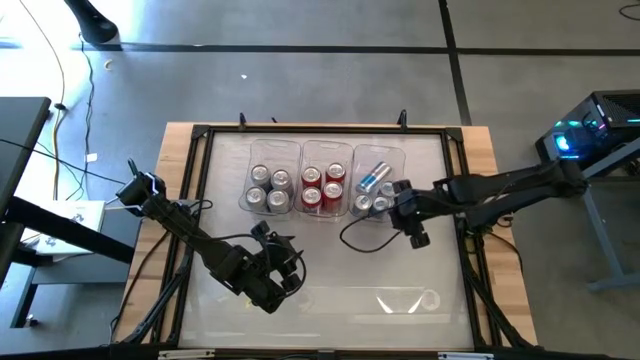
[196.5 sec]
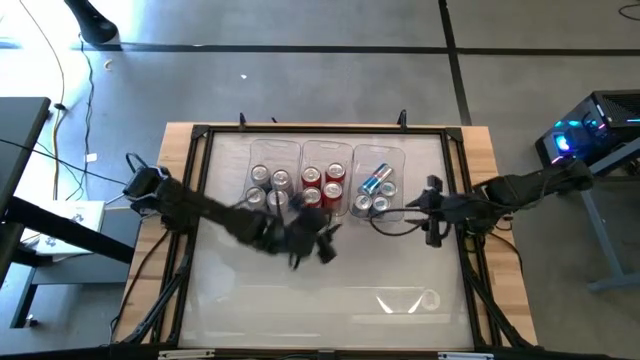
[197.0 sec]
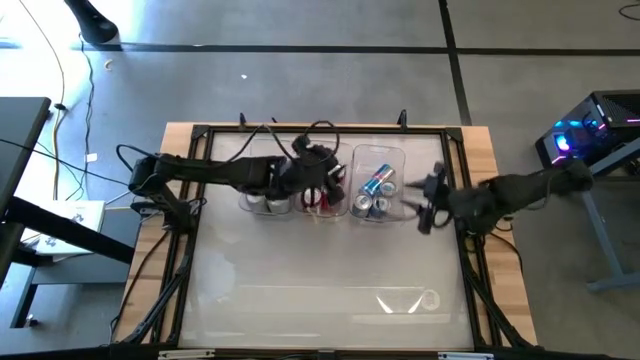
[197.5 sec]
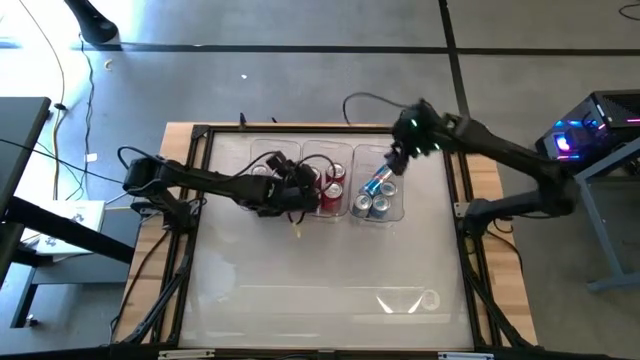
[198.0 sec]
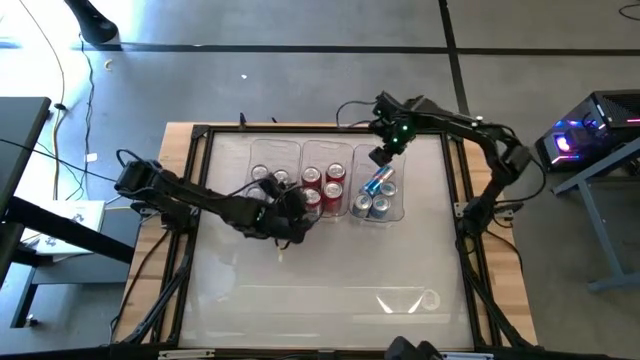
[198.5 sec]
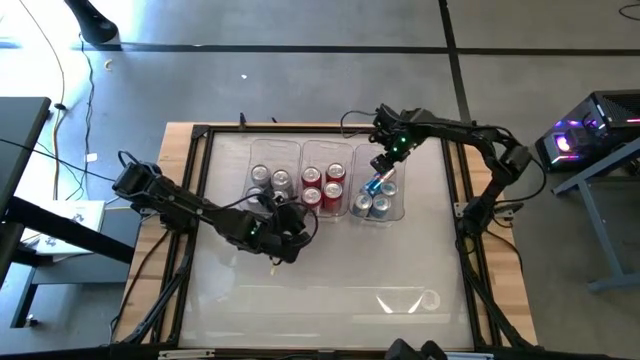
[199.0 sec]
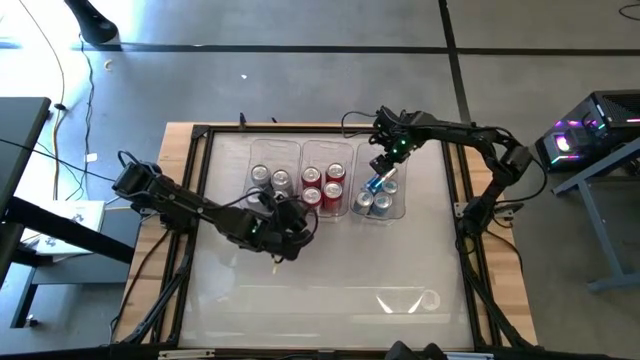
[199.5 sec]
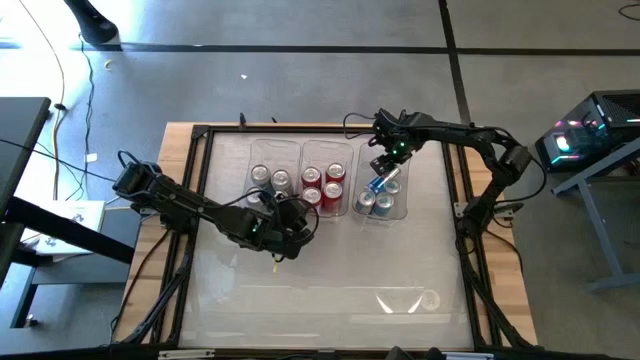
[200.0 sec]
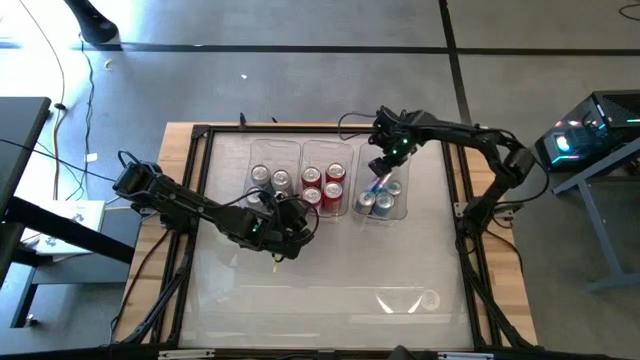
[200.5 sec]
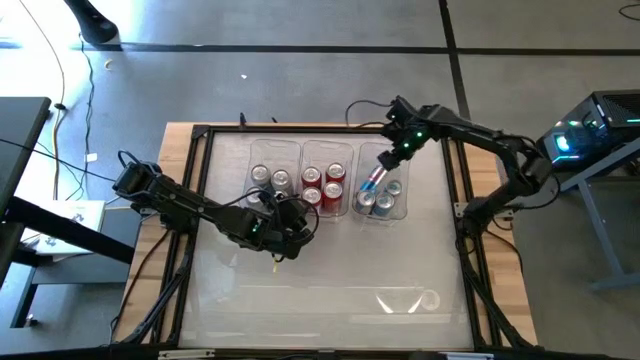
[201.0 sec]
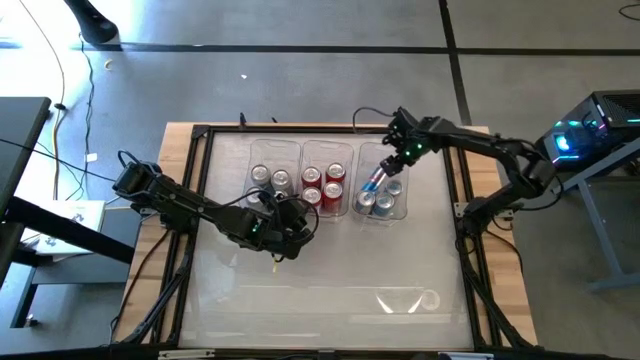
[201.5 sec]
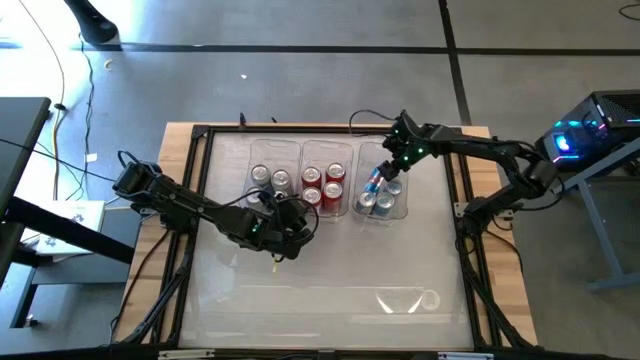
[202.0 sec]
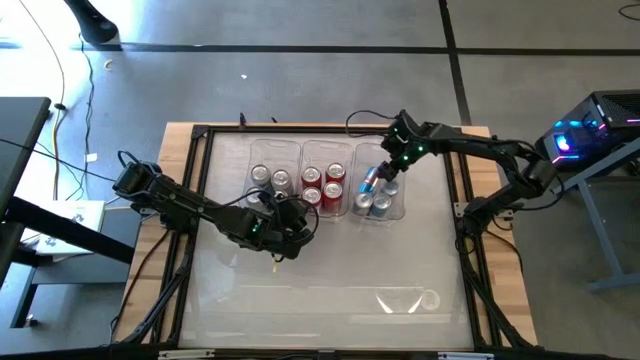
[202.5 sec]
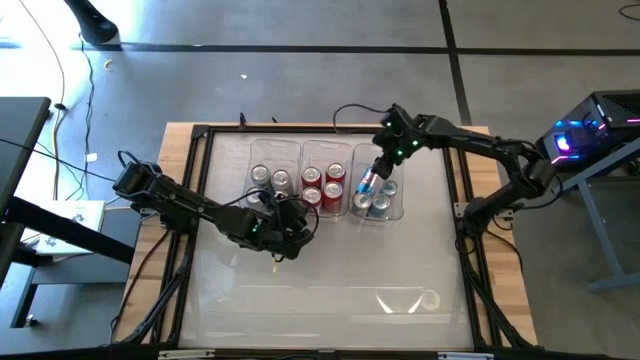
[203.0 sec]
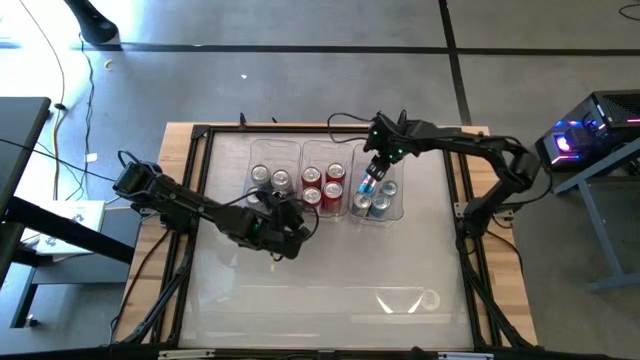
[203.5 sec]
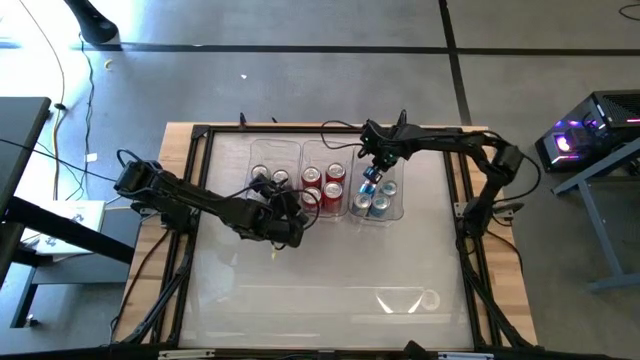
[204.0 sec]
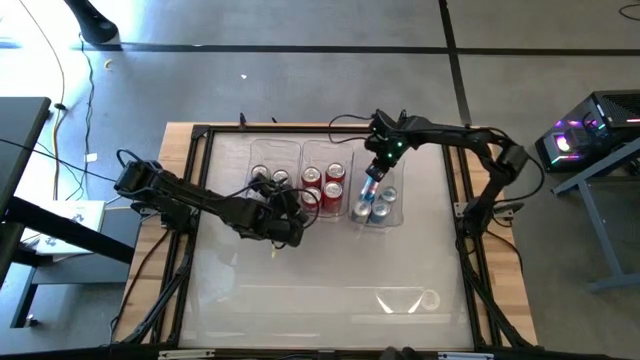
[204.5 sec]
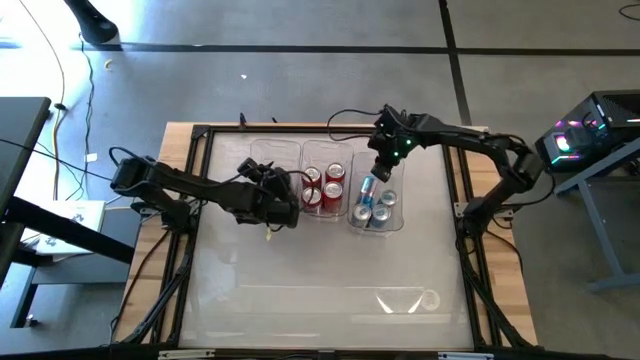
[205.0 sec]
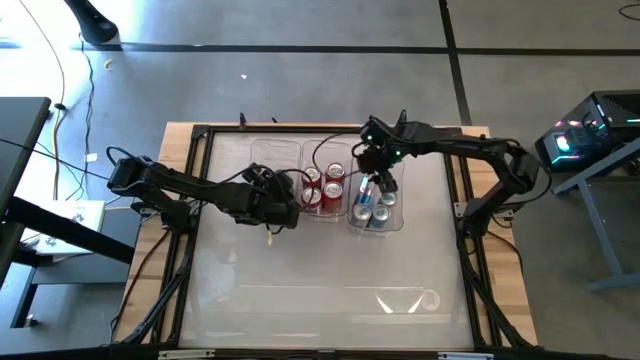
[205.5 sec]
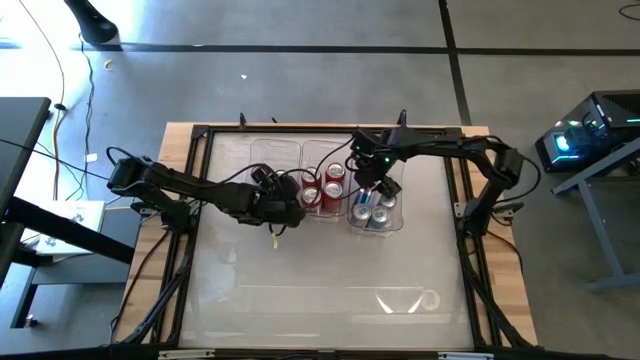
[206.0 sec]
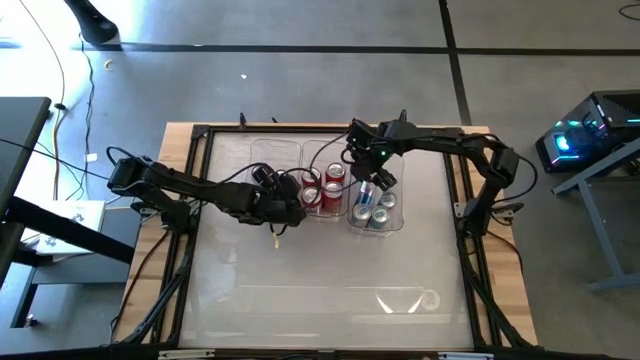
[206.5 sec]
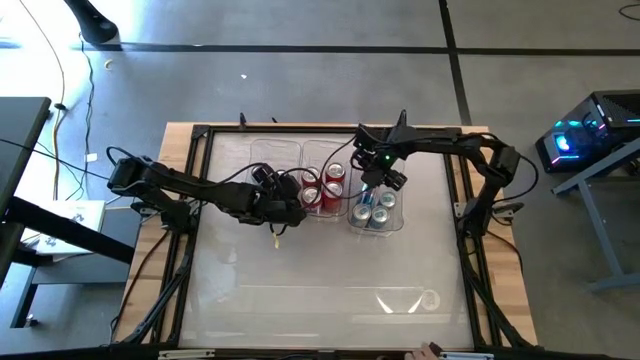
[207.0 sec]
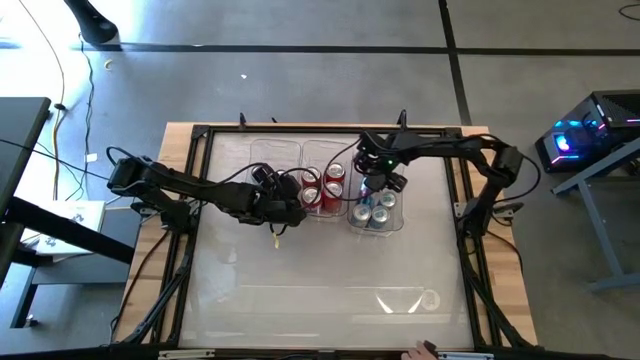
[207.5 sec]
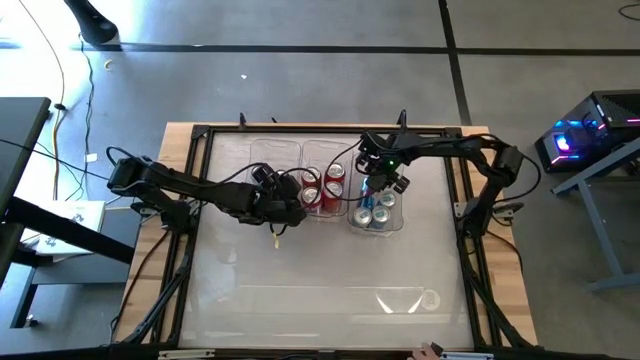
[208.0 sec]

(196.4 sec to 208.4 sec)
Task: Sort soda cans
Put the top left blue soda can inside the right transparent bin upright

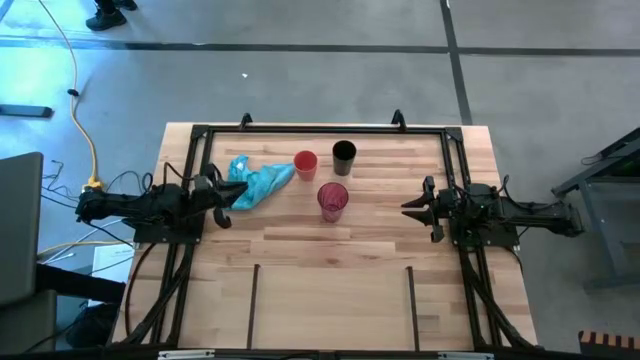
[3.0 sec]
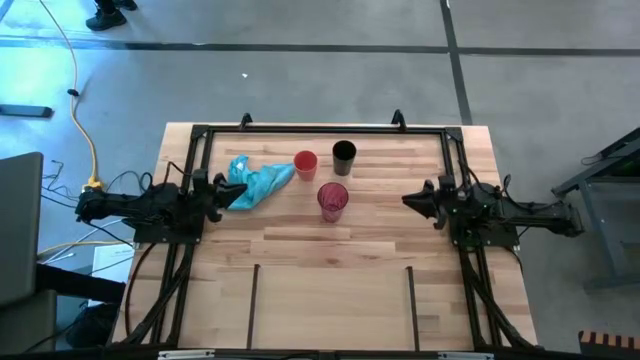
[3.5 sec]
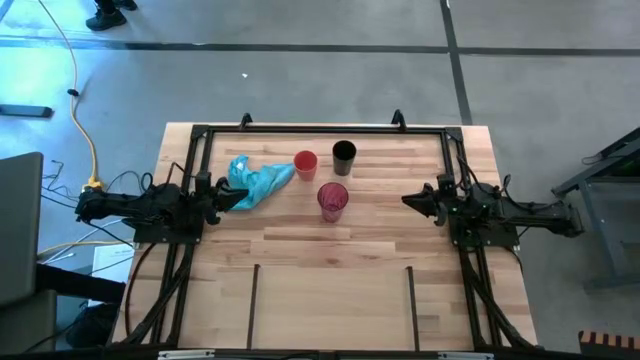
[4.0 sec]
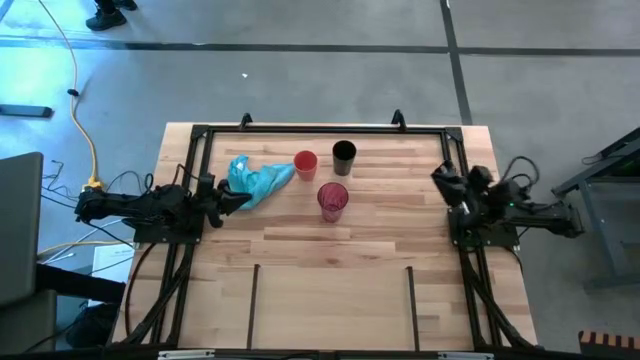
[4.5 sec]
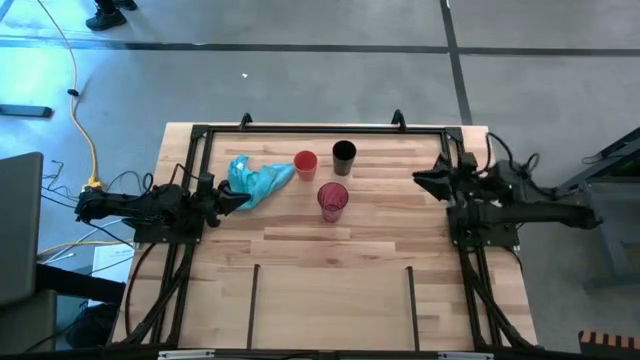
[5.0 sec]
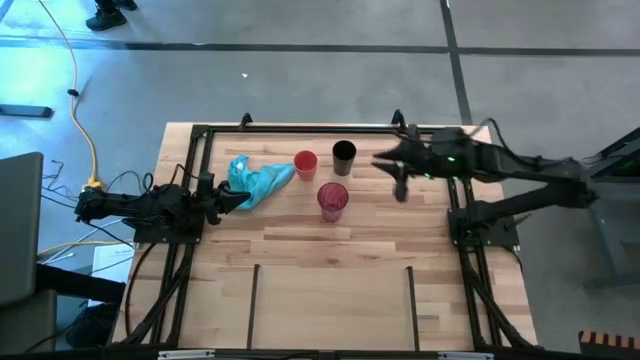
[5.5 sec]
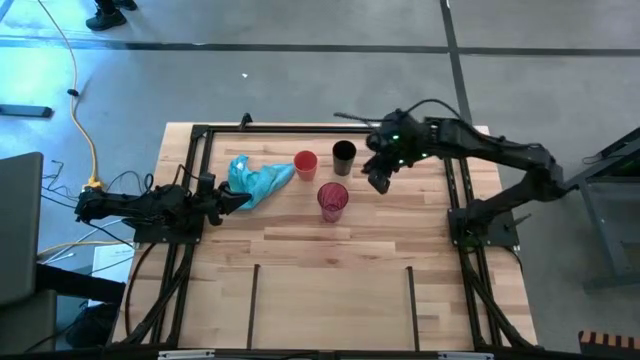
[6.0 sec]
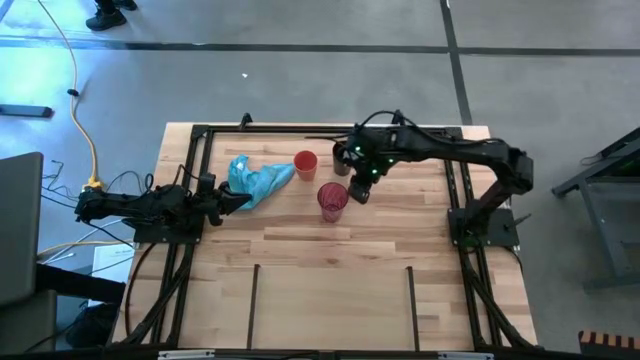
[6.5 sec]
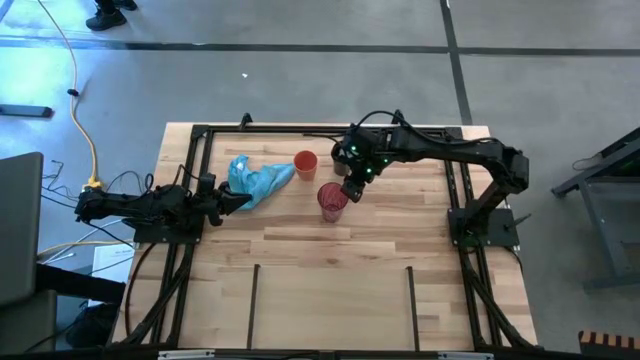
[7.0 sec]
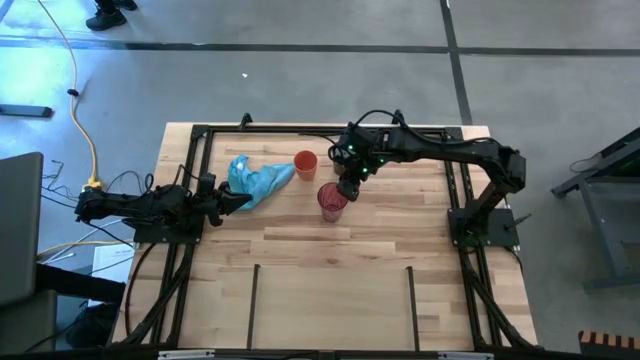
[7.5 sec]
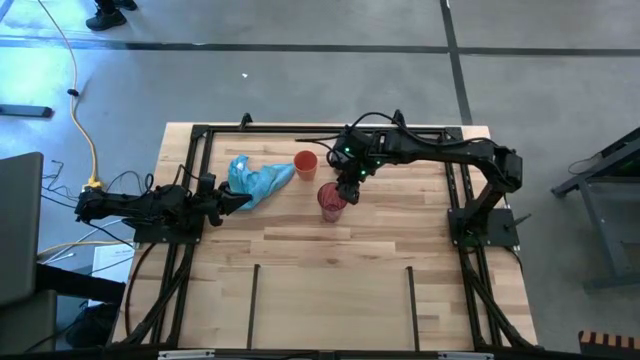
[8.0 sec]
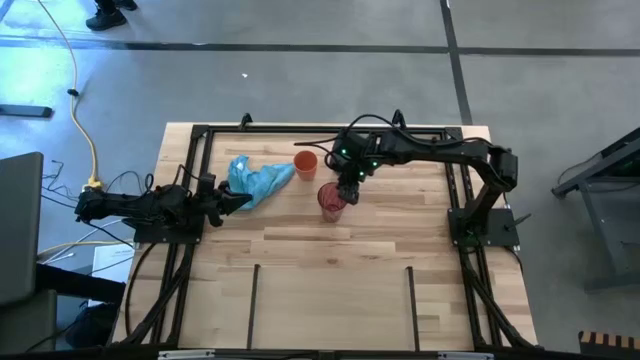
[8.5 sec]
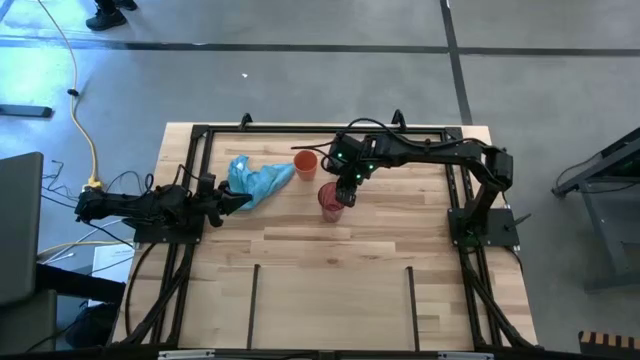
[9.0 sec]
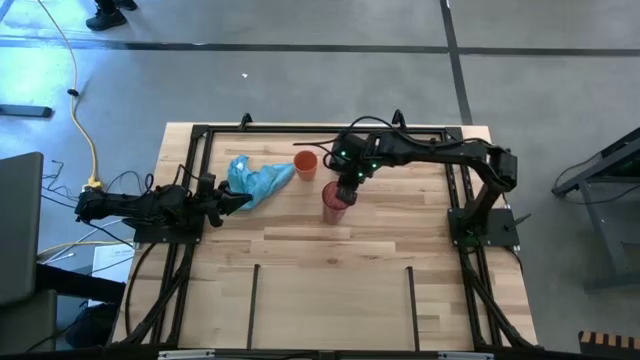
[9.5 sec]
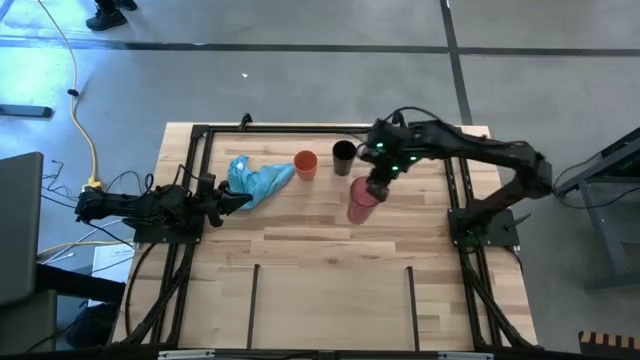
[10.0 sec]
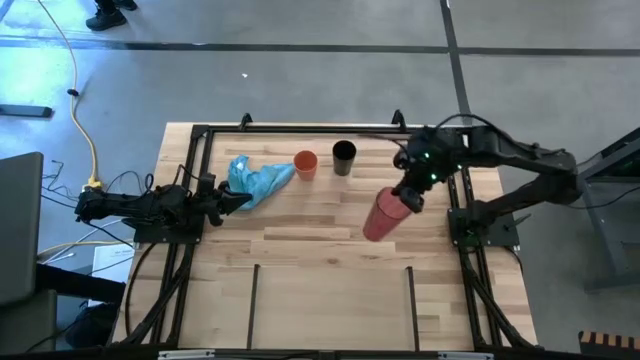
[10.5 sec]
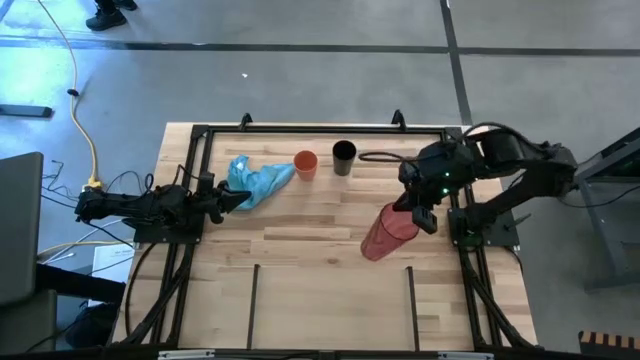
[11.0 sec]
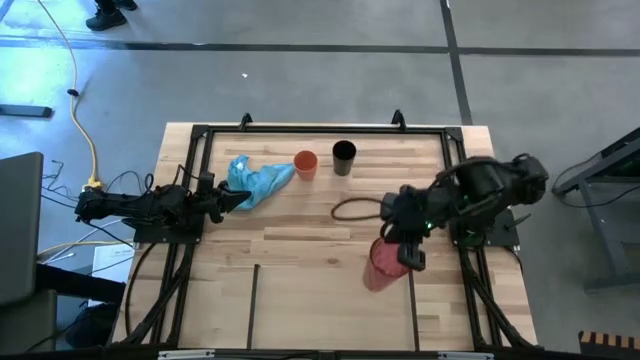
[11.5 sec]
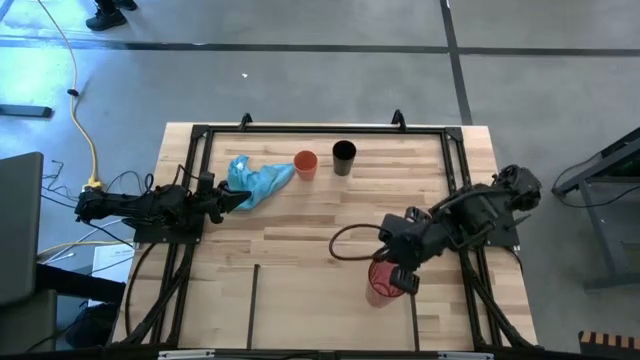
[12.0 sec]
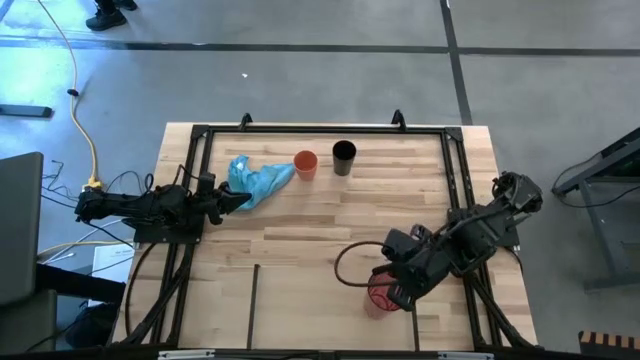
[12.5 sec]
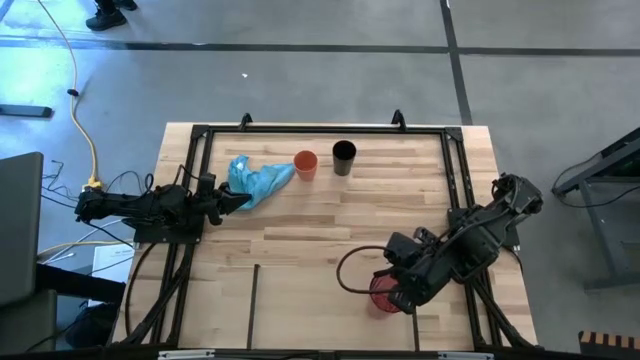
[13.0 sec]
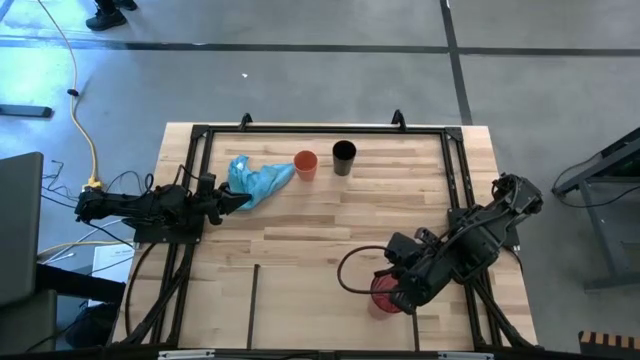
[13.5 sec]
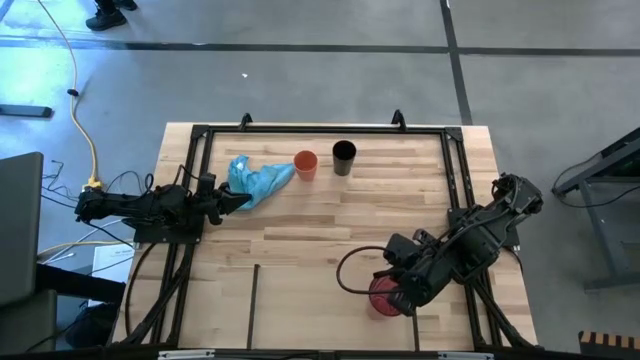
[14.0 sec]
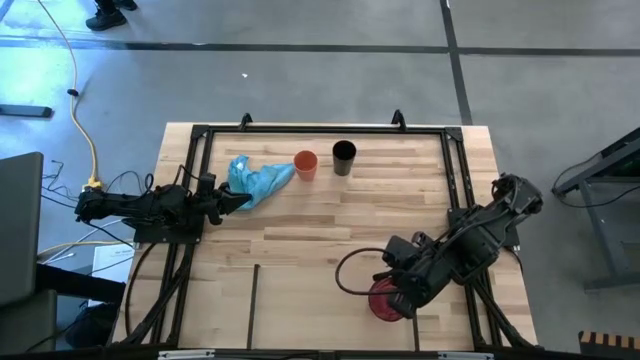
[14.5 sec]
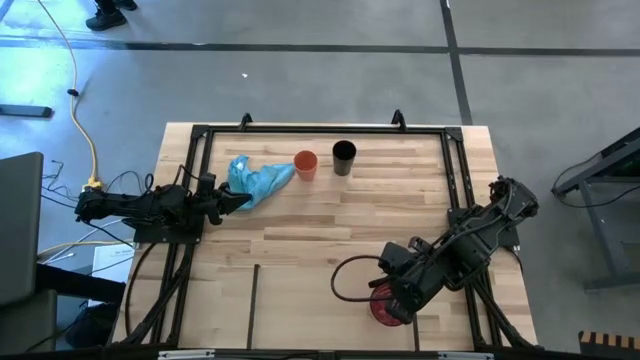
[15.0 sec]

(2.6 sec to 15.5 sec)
Task: Stack small to large cups/mugs on shelf
Put the red cup on the shelf
